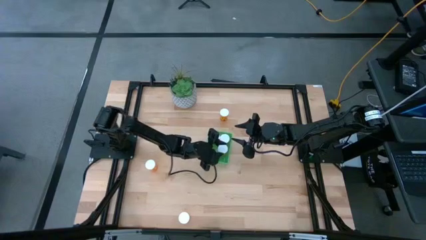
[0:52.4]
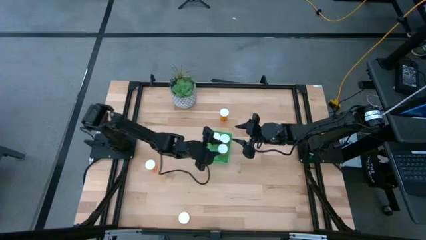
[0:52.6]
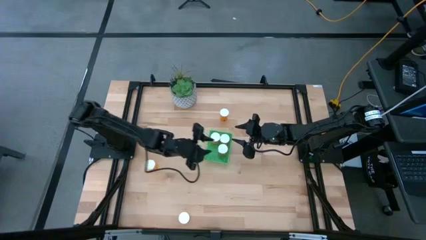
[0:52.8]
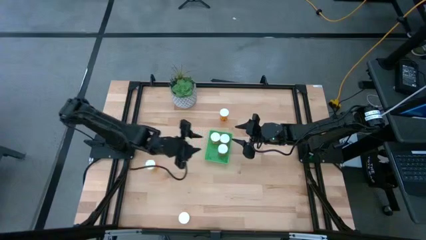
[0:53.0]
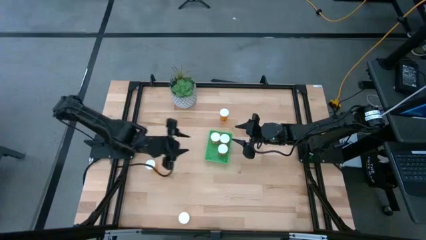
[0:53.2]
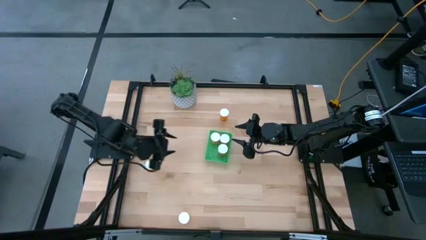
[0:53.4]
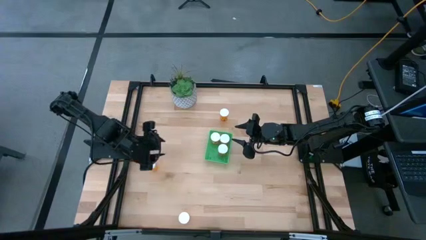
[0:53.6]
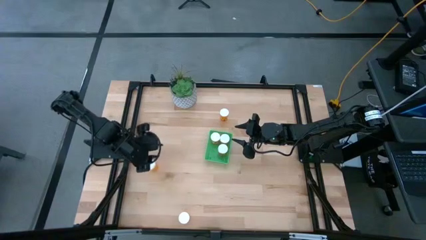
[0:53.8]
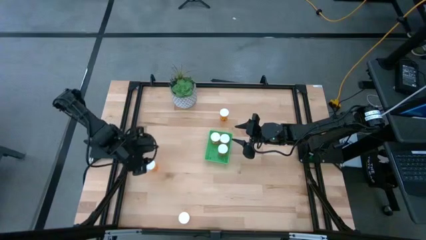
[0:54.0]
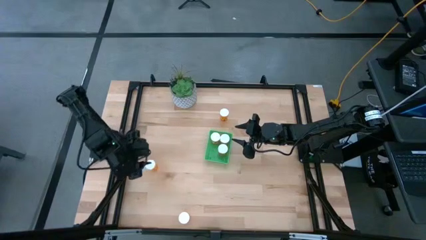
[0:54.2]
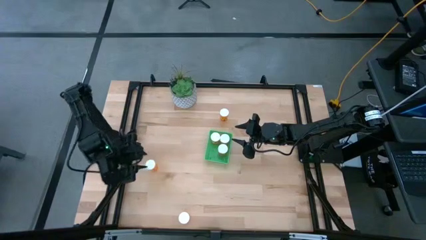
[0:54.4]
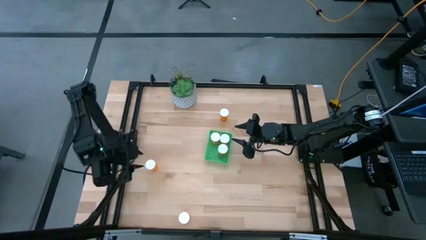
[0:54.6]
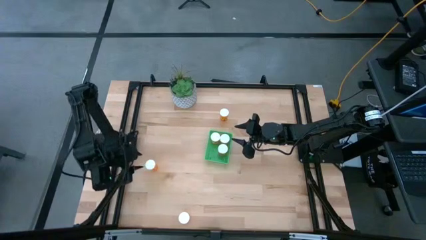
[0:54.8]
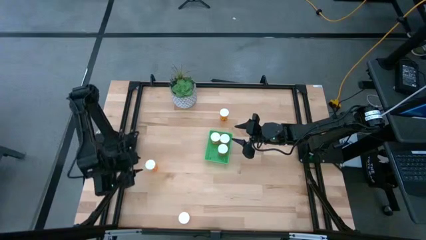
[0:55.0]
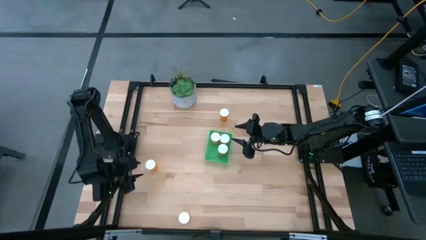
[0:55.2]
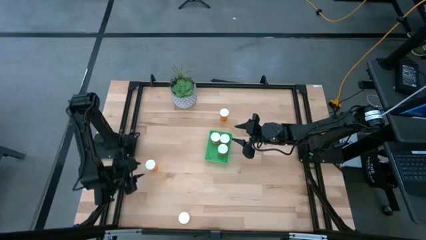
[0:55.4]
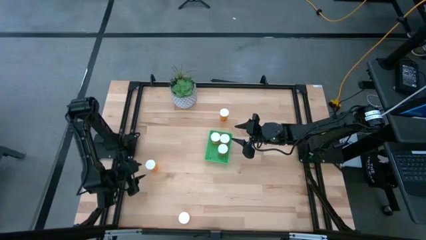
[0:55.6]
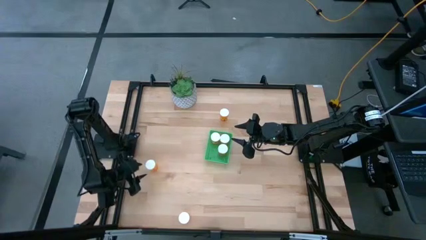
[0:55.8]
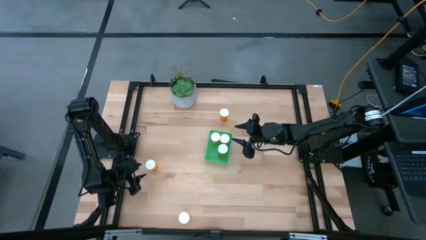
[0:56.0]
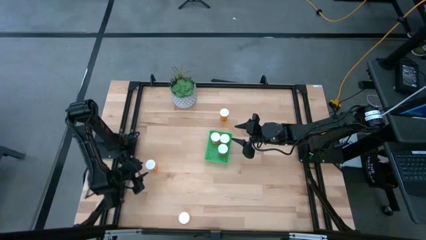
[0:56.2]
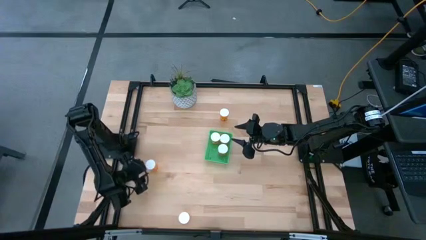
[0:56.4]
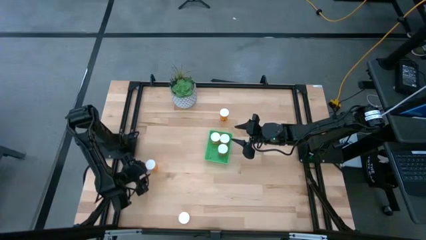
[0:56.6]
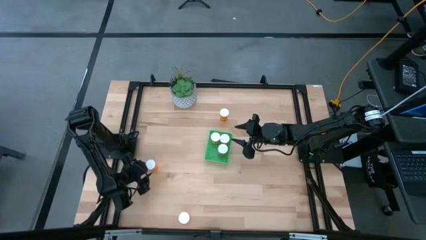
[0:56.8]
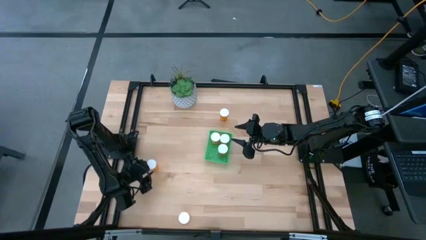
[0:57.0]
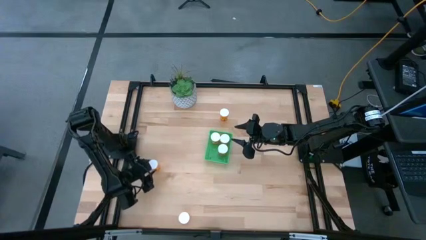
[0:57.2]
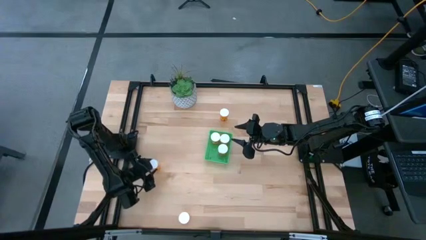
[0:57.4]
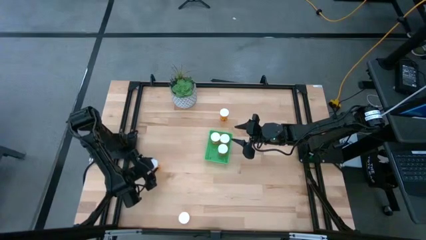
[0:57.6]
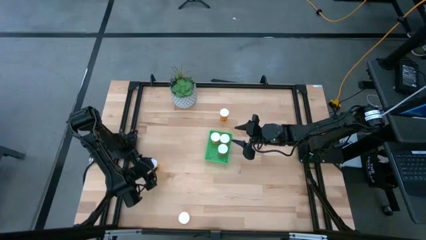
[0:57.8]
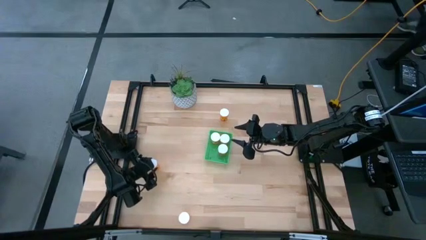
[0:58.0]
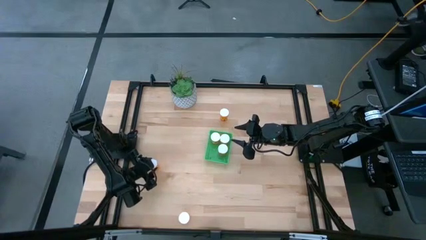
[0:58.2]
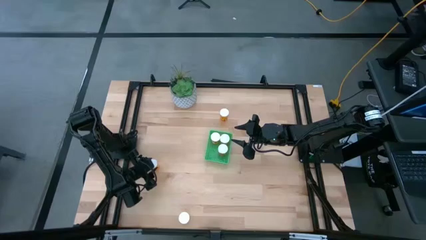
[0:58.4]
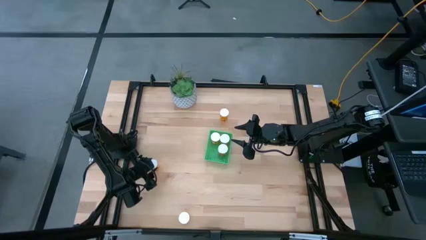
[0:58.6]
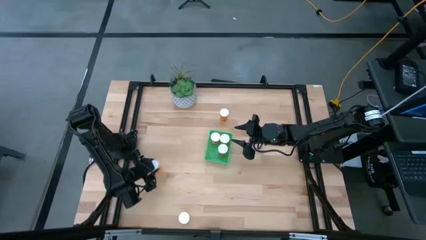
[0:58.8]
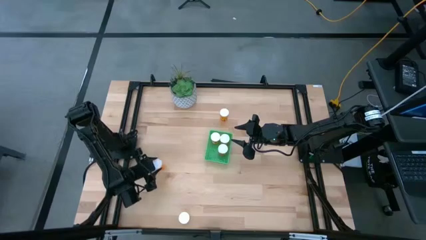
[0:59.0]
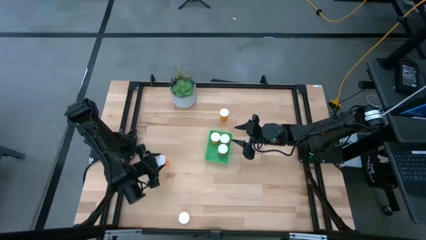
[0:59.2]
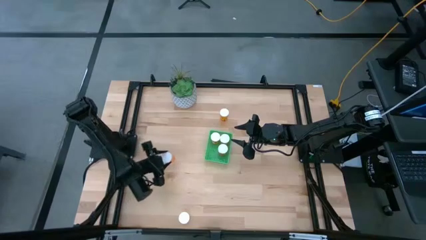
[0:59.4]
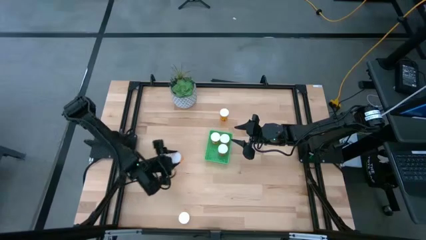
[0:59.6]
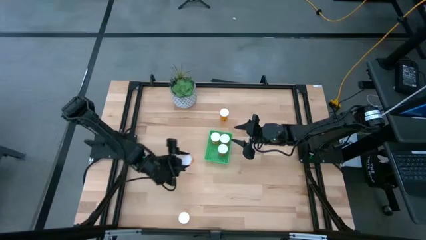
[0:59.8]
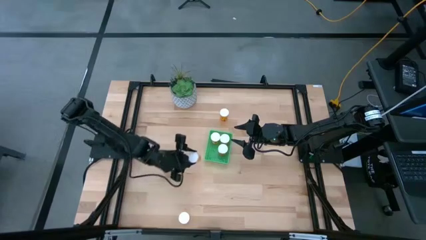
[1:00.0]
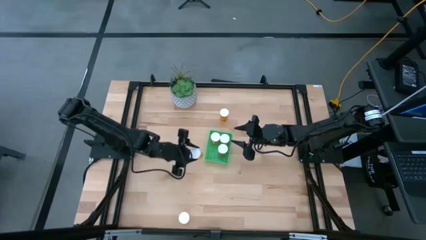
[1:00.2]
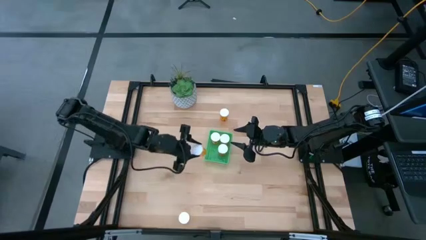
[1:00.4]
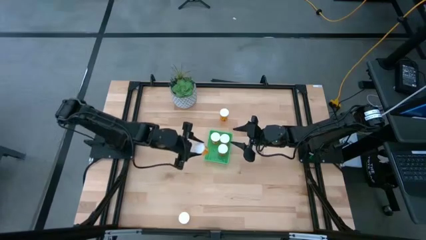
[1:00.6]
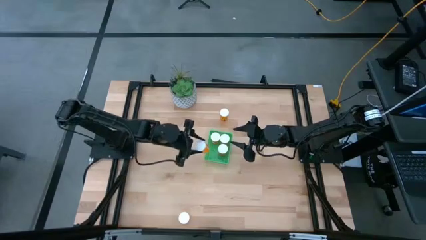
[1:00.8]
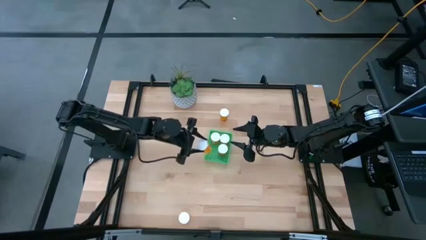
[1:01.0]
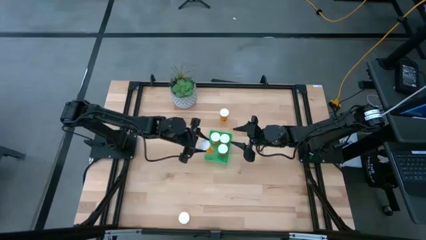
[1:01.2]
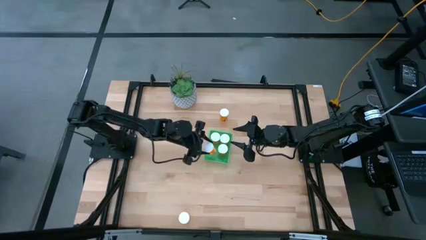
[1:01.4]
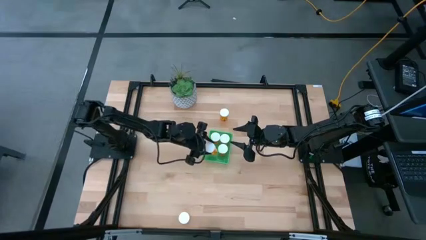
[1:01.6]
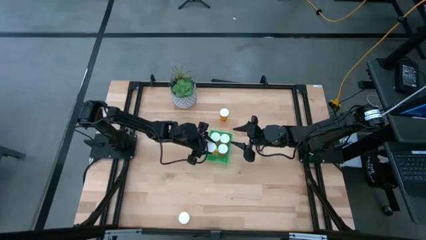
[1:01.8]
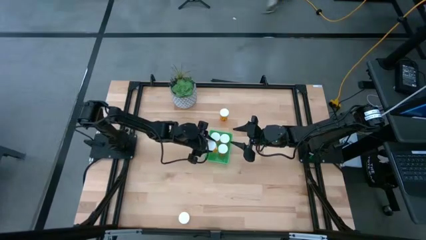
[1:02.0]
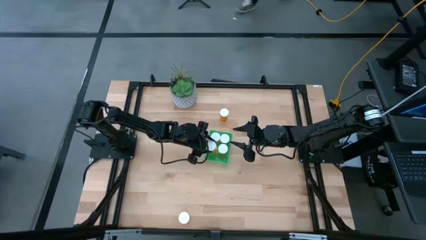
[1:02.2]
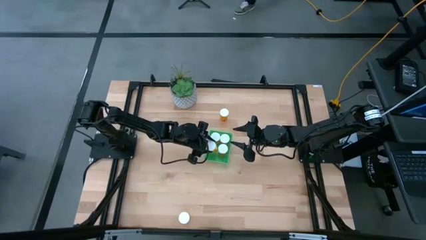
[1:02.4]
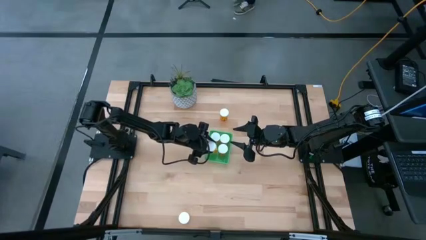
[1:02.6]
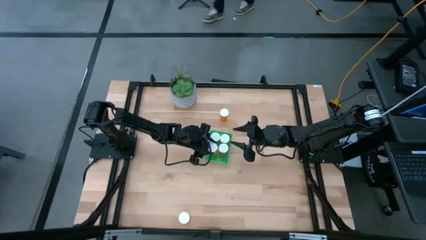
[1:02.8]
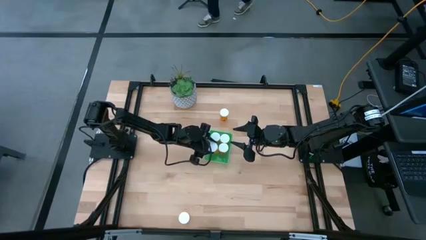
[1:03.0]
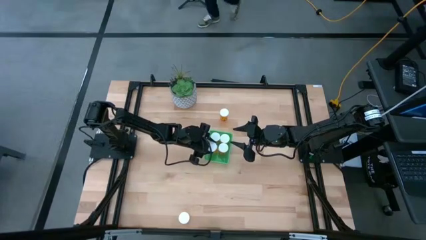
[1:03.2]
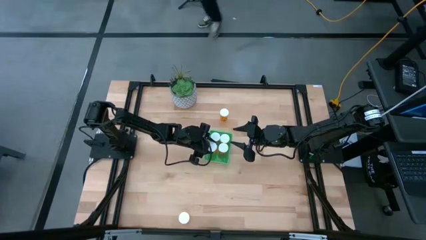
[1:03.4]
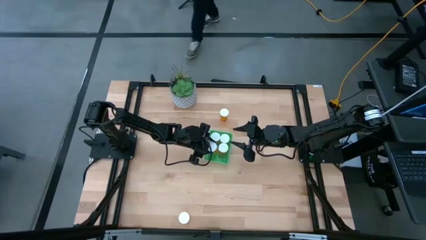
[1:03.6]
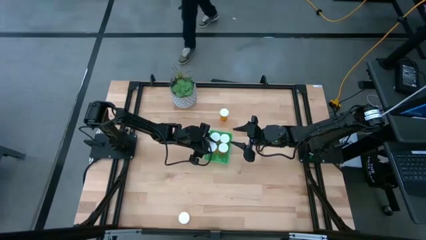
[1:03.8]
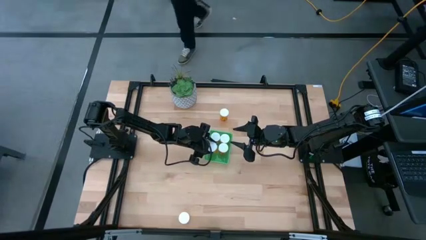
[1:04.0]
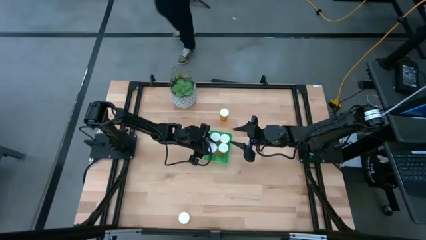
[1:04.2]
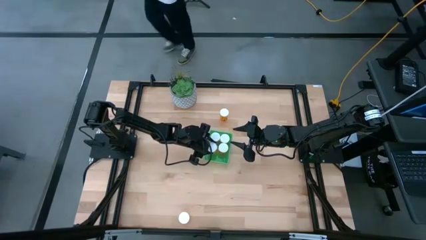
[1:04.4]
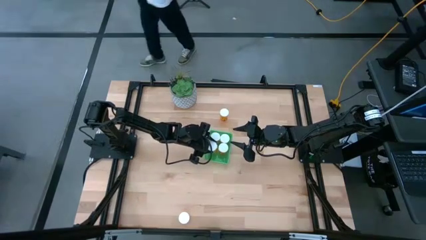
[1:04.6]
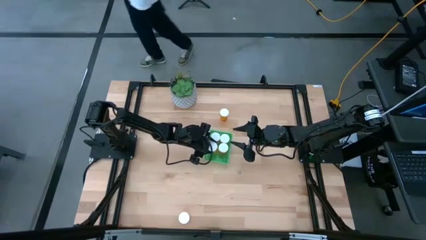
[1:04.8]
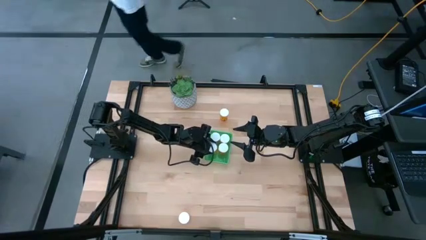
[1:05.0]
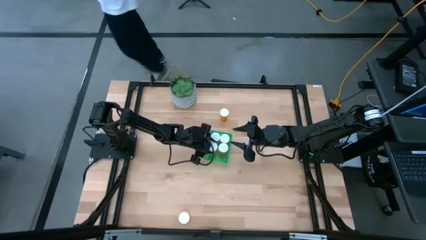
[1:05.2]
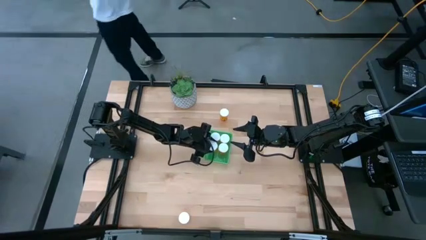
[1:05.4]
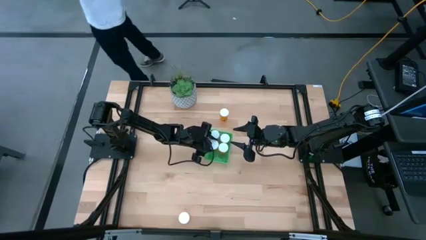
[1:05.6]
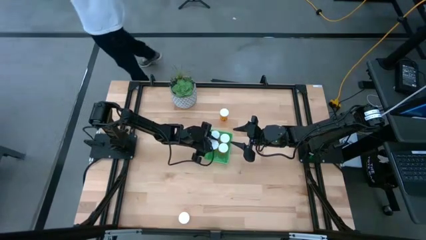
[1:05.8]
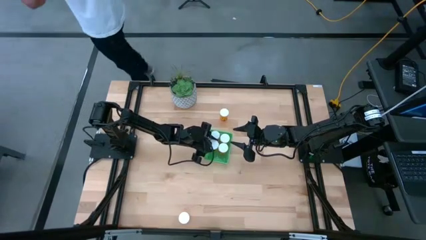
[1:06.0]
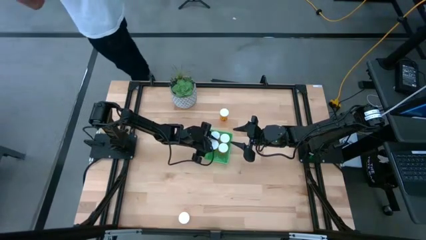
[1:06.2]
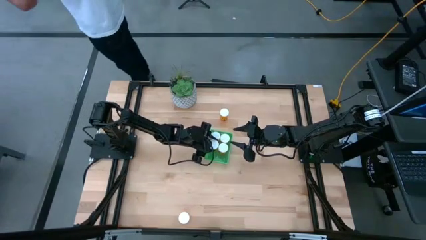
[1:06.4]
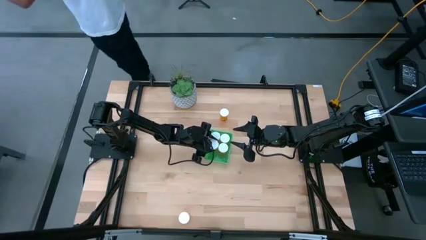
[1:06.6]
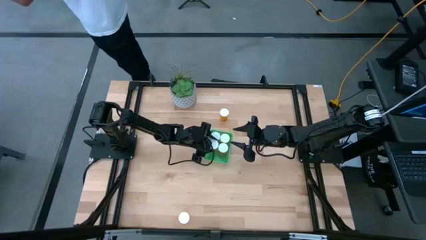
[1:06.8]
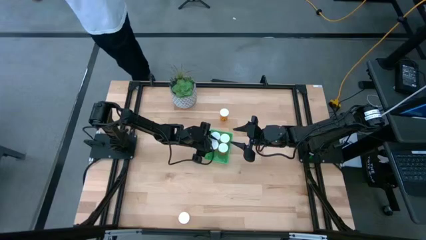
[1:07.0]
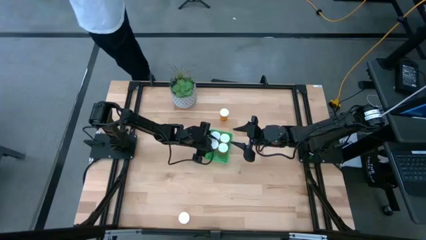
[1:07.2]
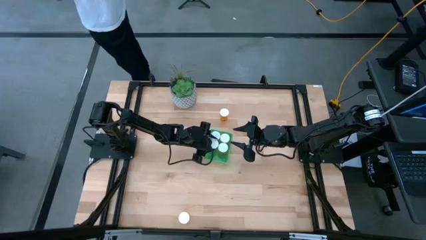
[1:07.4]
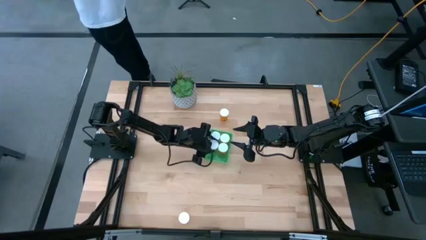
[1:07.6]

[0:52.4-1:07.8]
Task: Pick and place pill bottles into a basket
Put the orange pill bottle into the green basket

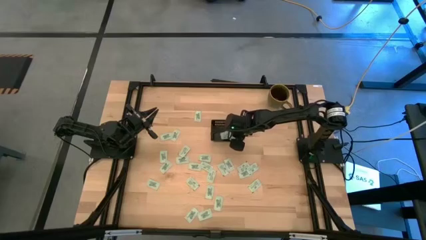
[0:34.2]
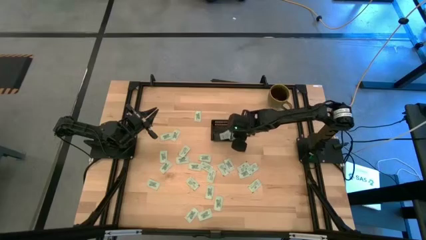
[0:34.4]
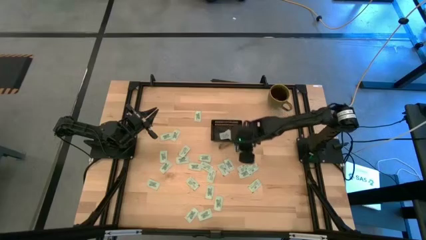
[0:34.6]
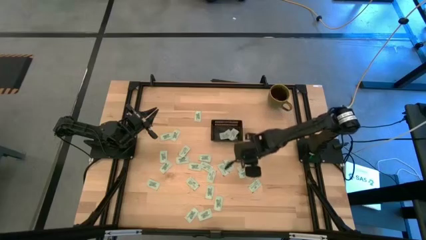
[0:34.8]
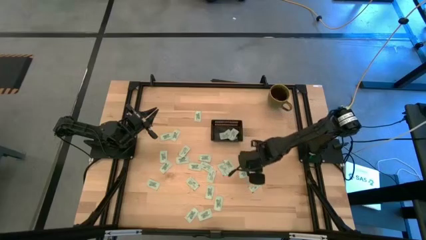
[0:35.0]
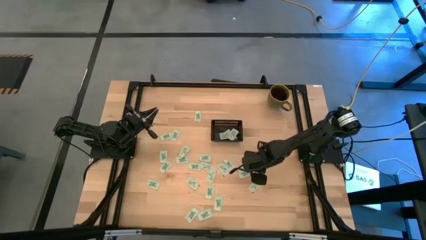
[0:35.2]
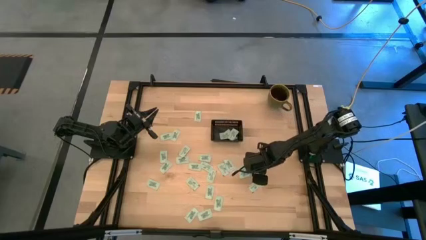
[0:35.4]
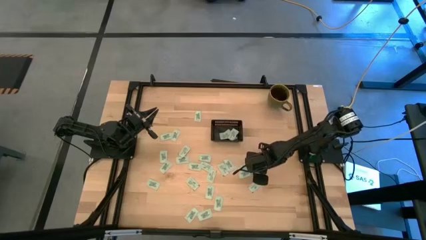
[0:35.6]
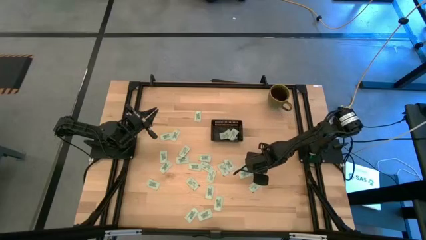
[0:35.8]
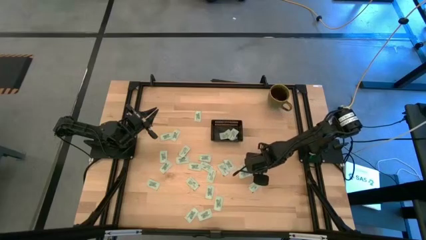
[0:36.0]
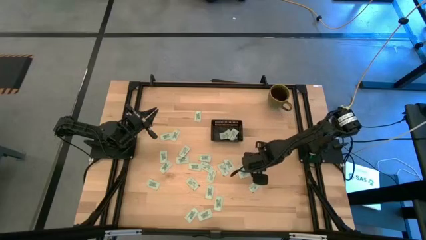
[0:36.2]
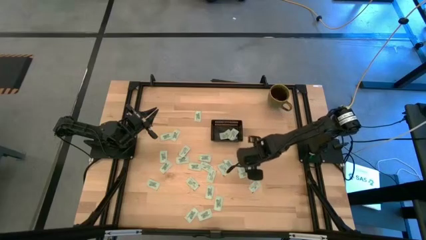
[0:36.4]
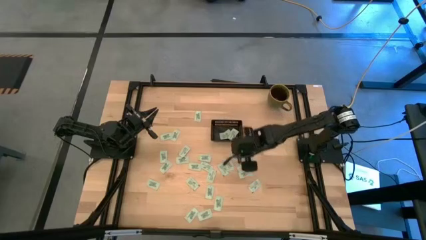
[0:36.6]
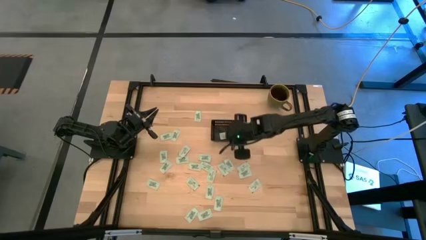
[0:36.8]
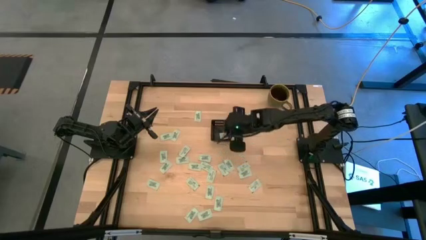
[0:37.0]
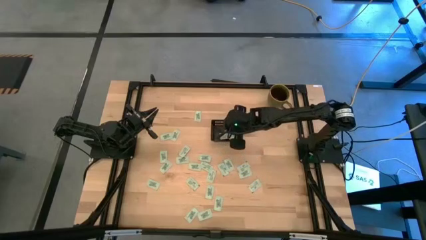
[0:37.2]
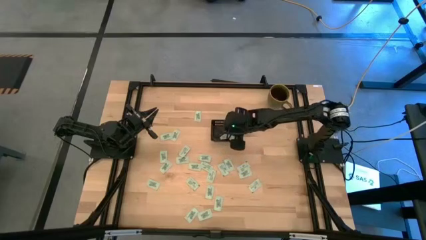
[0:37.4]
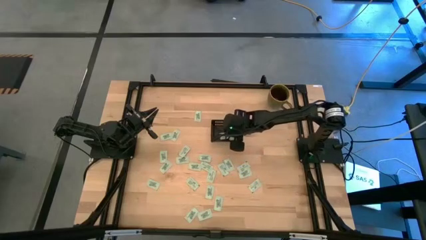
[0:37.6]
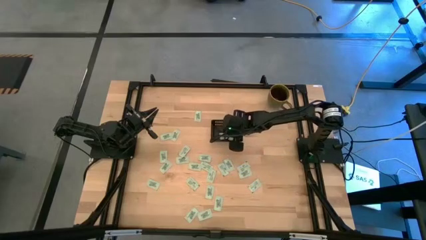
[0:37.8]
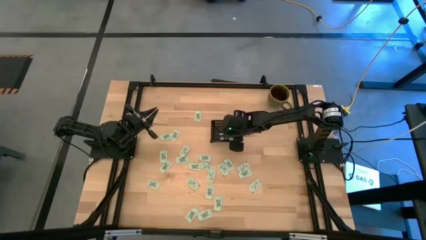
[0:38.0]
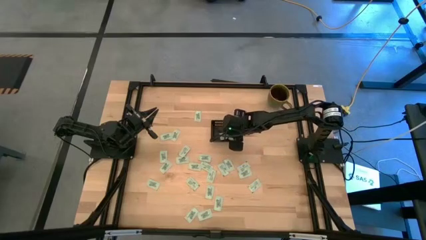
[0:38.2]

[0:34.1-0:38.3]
Task: Pick and place Stevia / Truvia into bins
Put the stevia packet into the black basket
